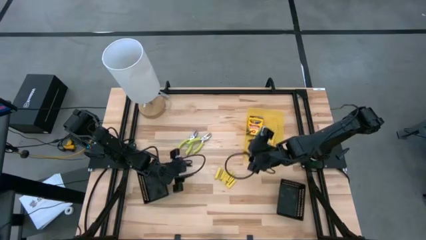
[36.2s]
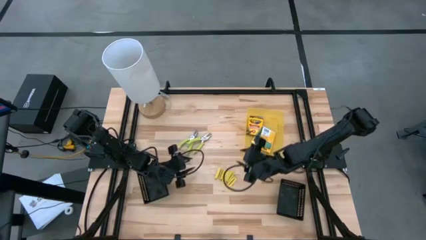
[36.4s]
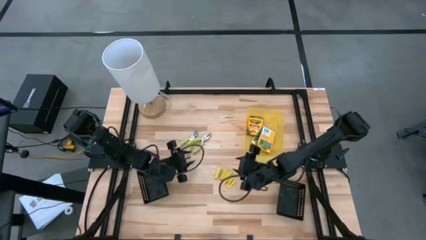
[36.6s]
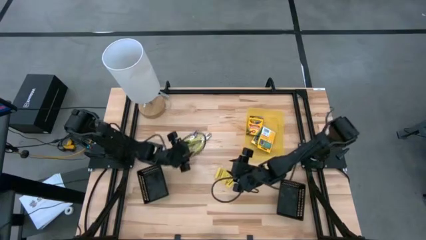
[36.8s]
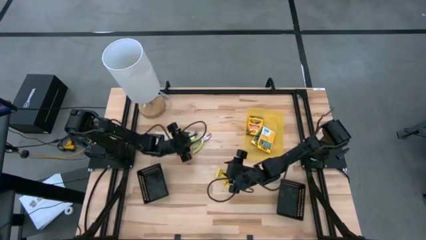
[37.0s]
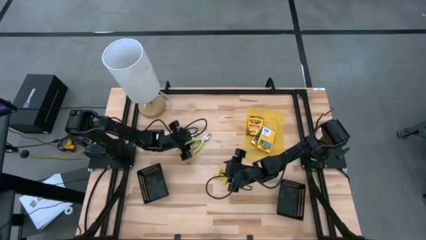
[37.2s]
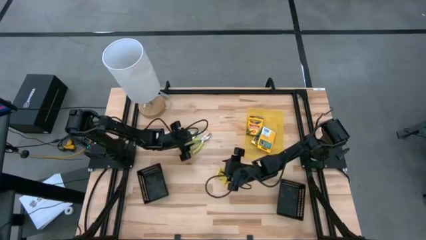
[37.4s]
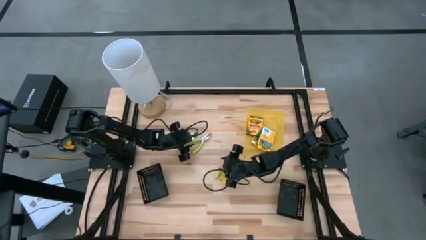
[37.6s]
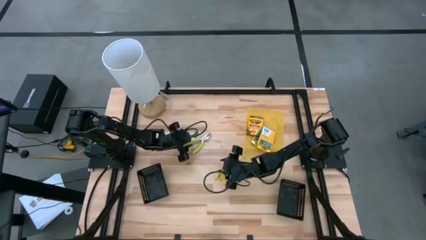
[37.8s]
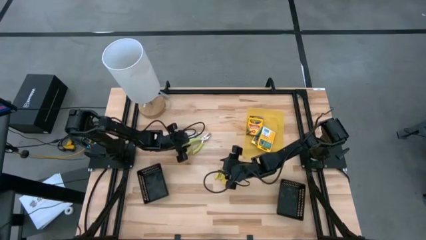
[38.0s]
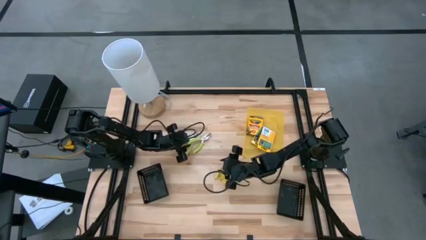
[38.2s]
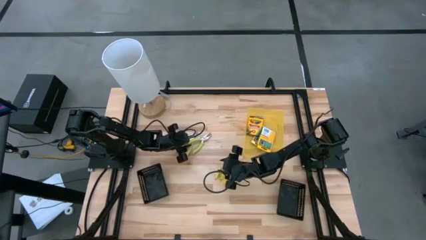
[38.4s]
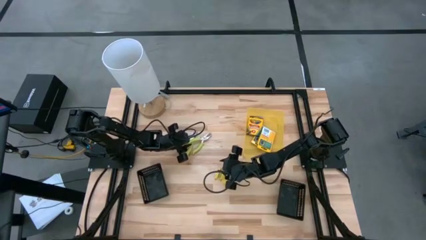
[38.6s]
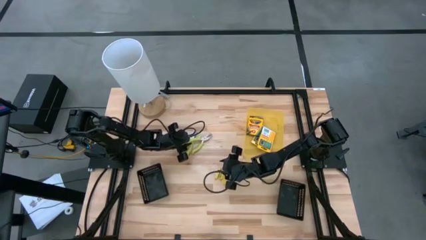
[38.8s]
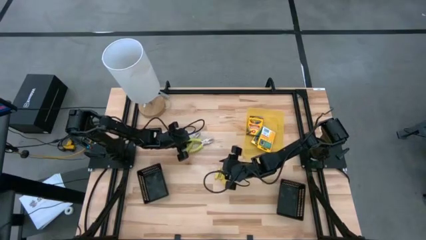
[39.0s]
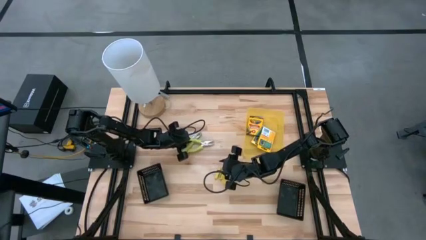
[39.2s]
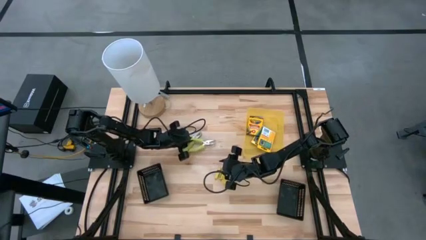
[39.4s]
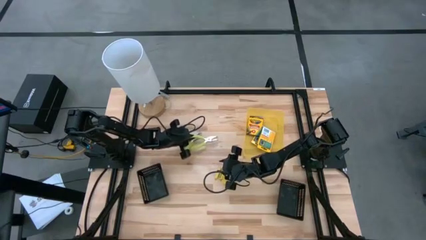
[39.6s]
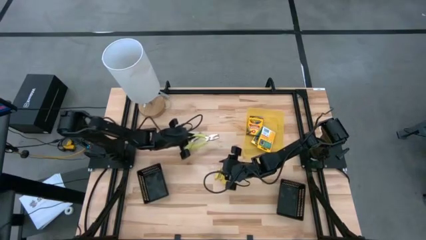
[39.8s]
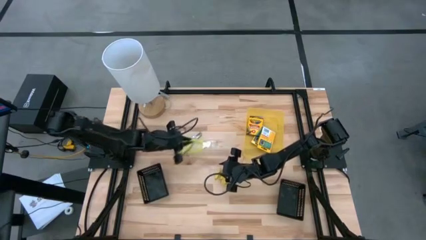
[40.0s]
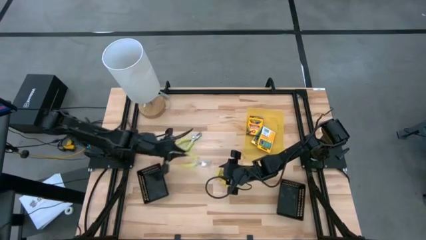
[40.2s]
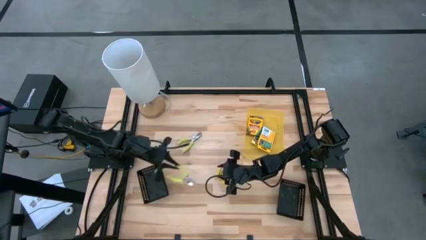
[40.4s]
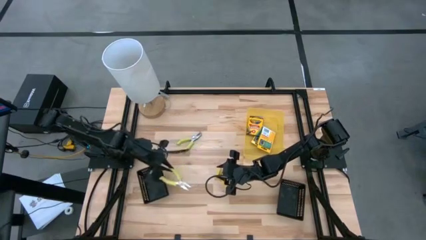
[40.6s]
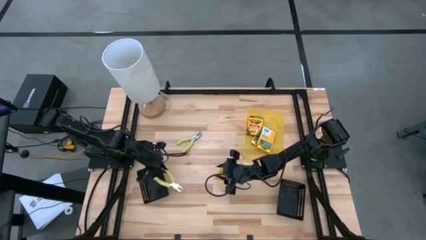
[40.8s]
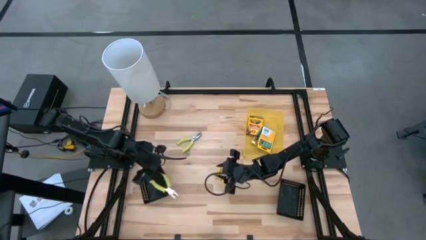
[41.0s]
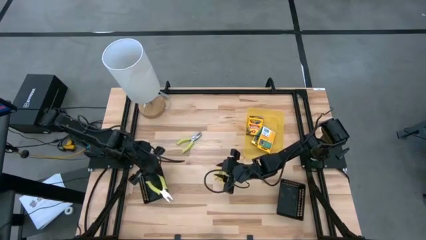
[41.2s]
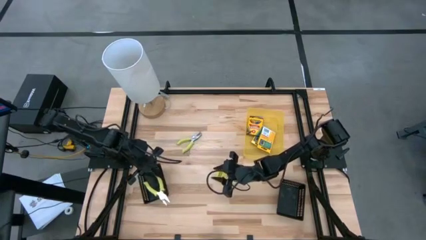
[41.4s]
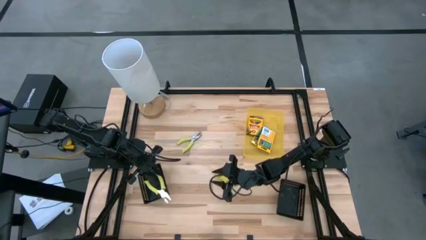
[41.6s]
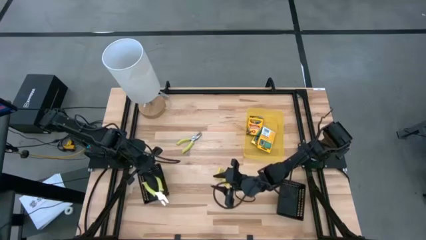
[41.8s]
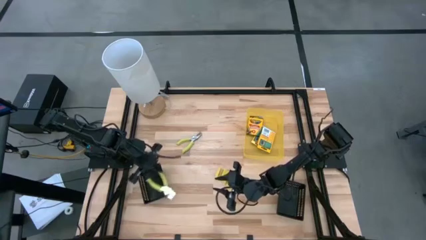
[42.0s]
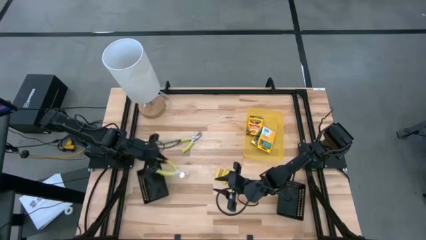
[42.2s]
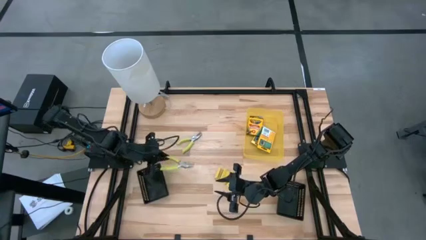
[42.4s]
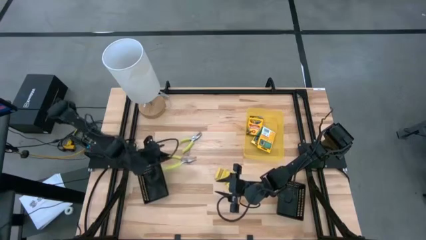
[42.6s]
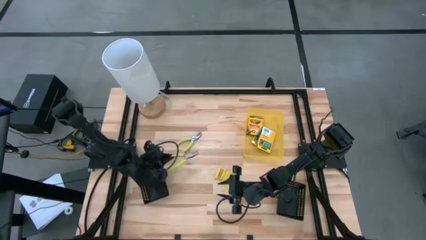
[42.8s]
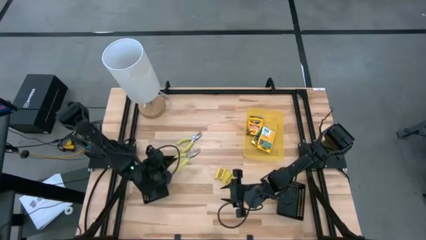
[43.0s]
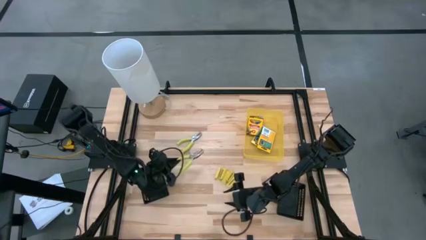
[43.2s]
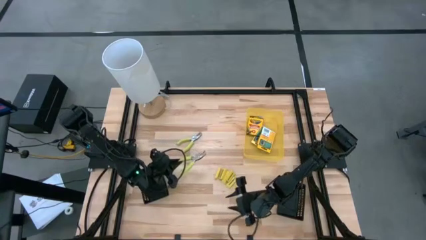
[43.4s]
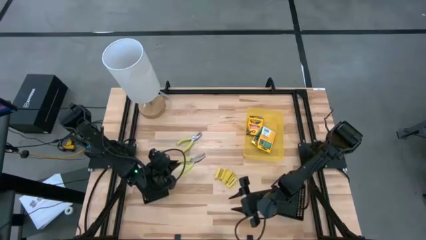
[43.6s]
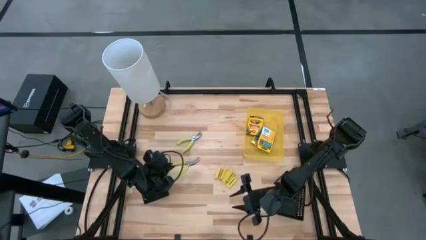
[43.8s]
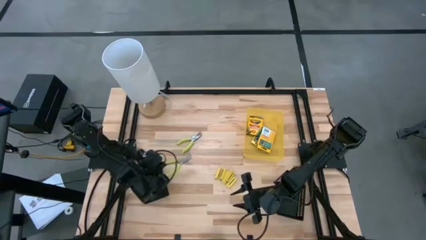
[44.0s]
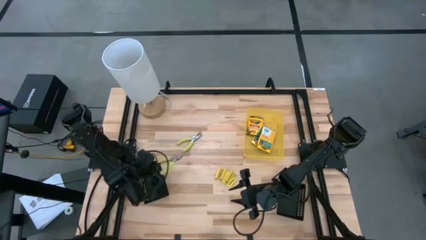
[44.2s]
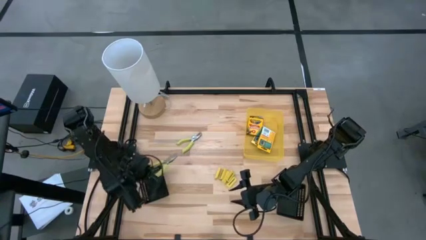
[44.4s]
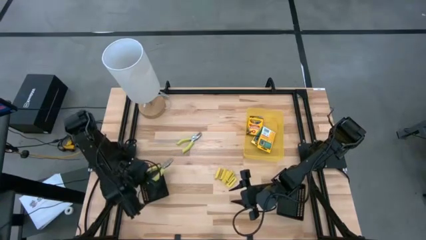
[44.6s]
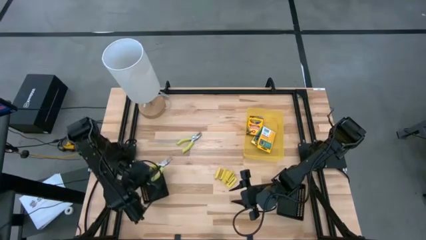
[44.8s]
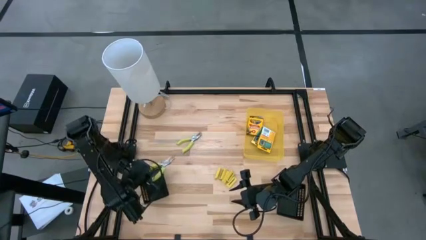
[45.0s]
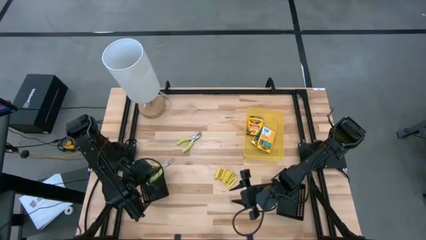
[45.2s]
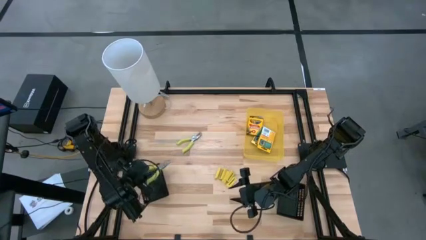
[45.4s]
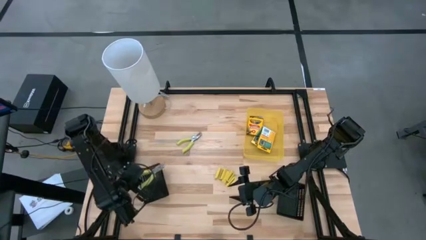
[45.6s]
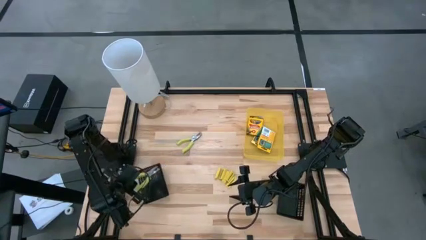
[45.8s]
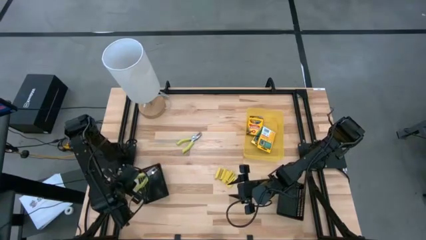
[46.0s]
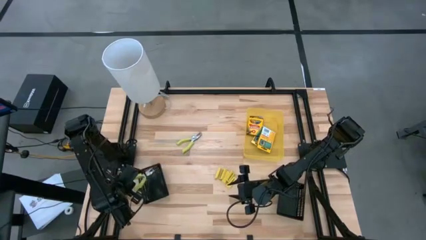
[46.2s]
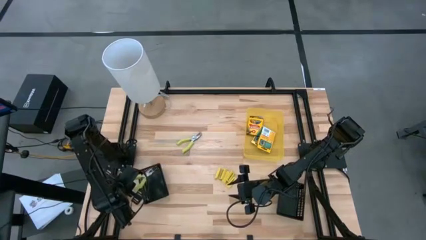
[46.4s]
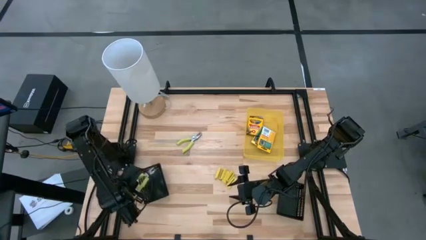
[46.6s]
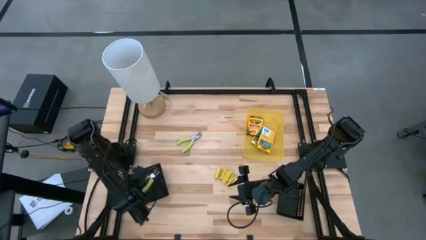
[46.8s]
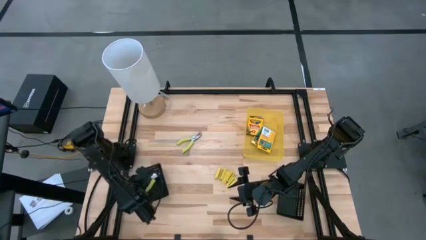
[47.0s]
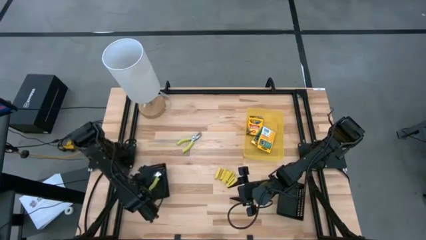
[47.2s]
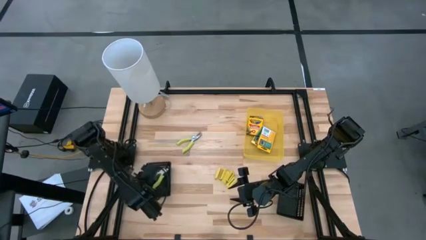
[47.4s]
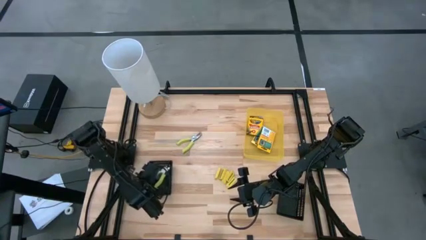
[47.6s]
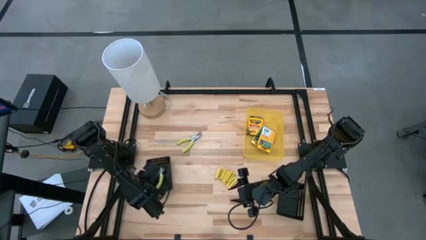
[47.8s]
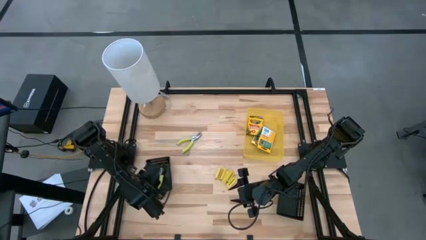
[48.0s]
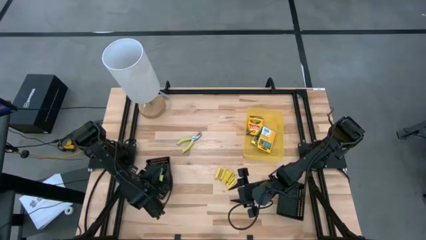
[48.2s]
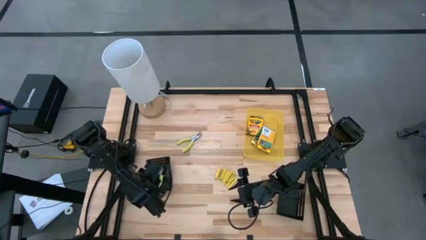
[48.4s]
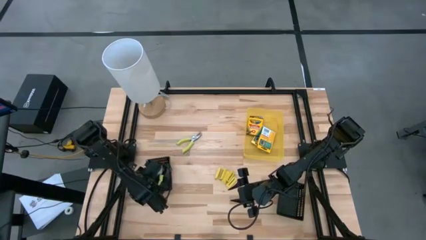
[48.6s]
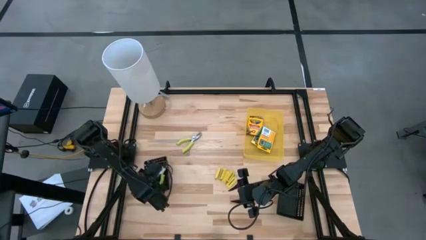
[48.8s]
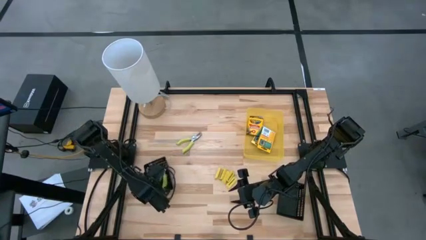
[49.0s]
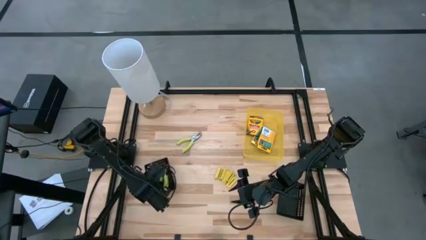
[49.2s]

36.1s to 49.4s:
Task: Pick & Place School Supplies
Put the right green single hole puncher into the left black bin

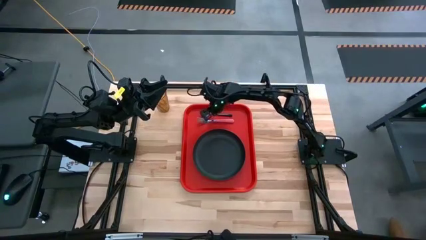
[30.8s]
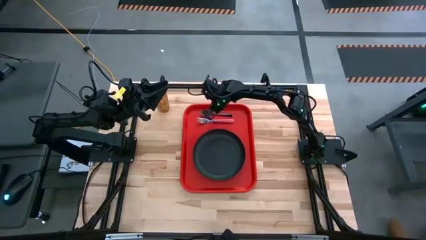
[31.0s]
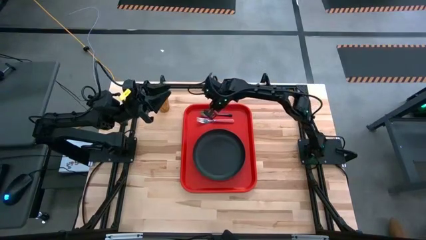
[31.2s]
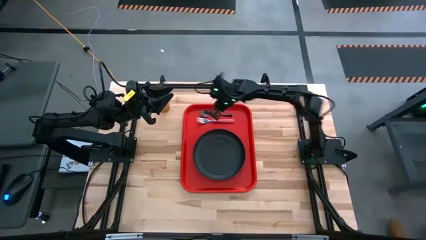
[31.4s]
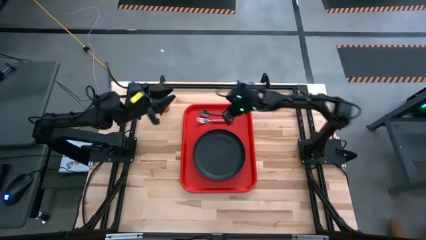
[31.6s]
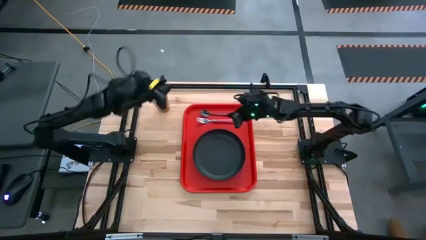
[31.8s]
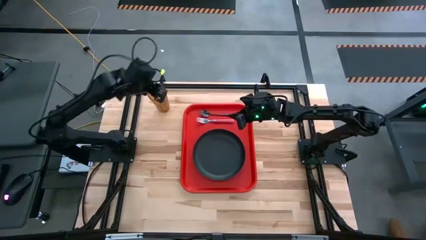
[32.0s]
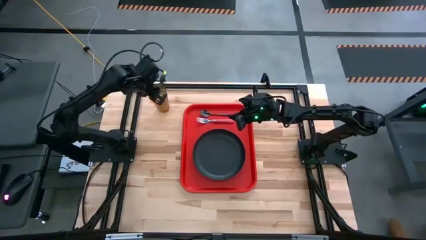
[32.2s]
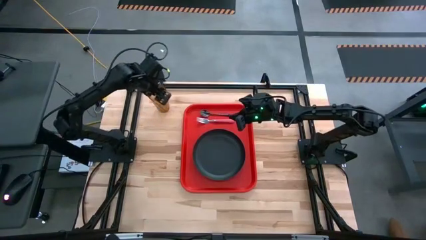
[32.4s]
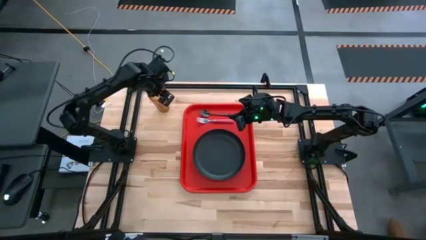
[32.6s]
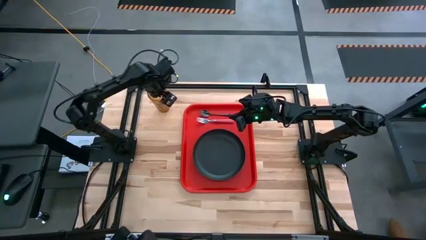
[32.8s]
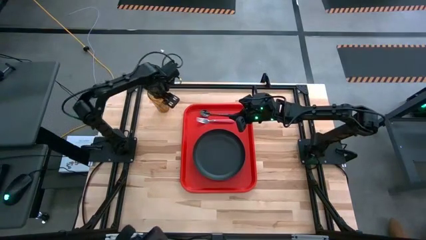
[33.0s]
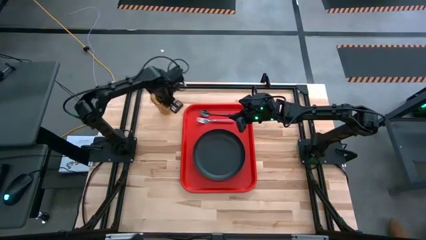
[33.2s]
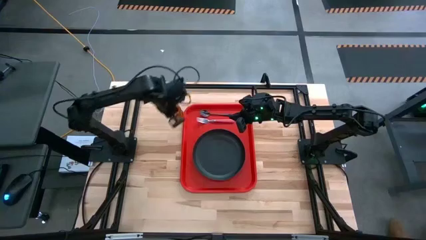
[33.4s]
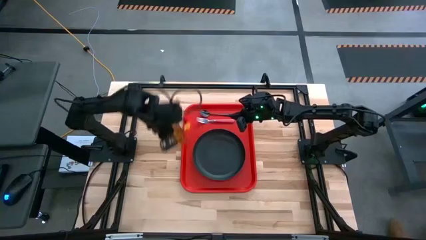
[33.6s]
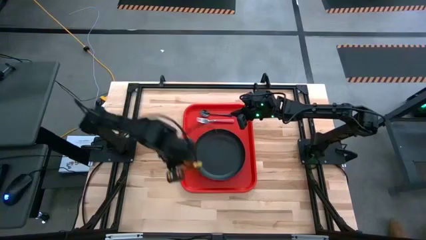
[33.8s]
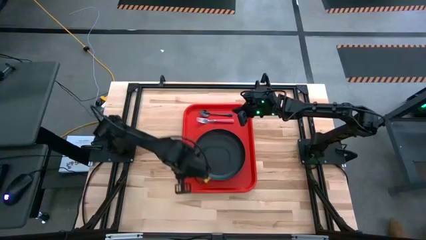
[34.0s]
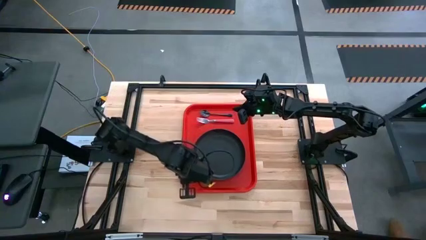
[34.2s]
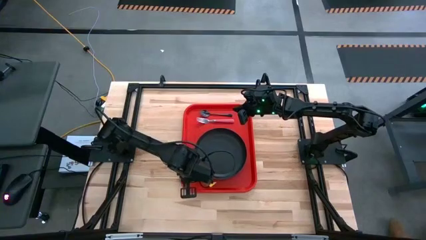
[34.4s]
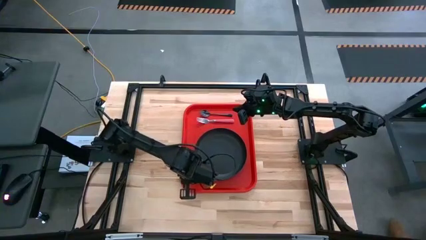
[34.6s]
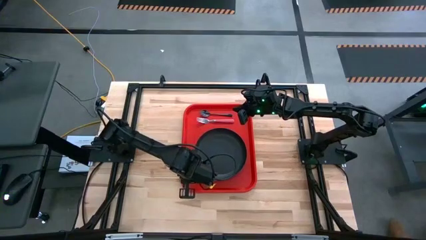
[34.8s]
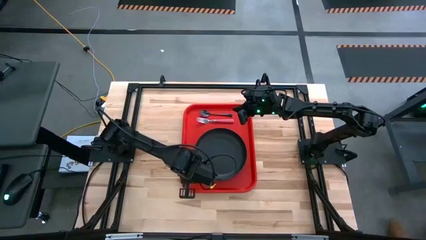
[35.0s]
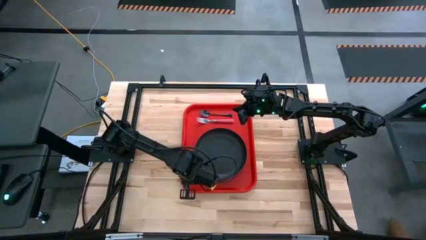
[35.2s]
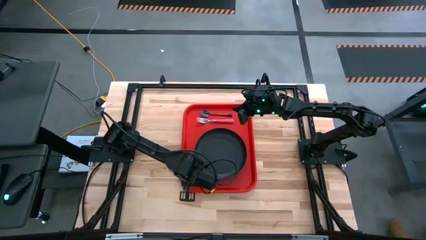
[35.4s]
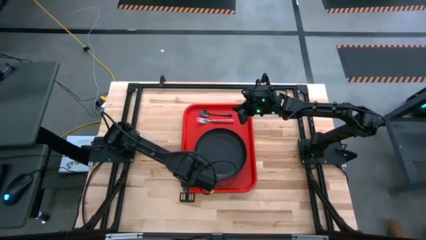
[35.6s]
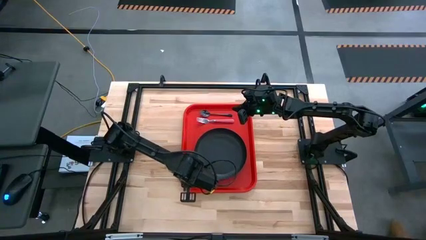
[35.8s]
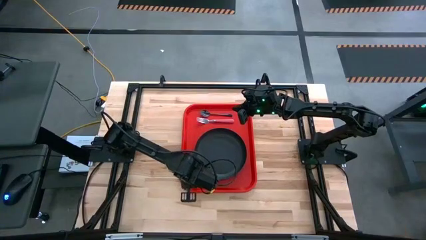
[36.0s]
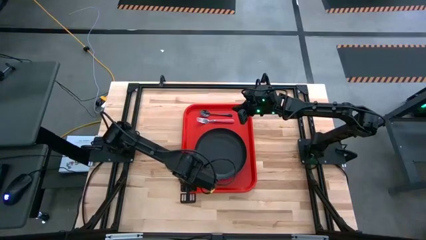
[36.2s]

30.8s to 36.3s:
Task: Pick and place plate/cup/fork/spoon on tray
Put the yellow cup on the bottom left of the red tray
